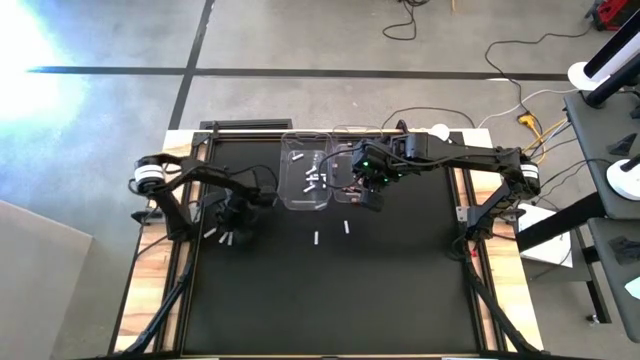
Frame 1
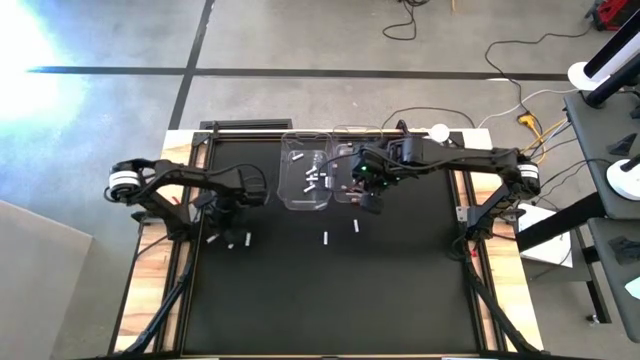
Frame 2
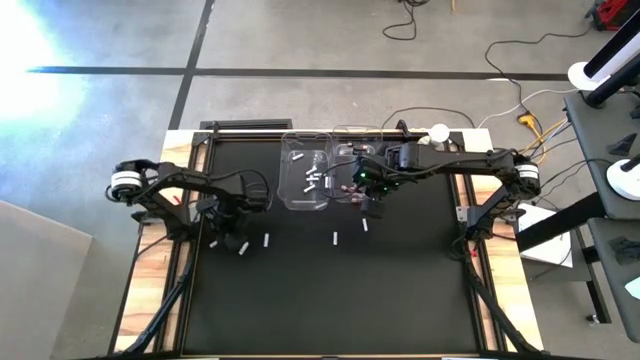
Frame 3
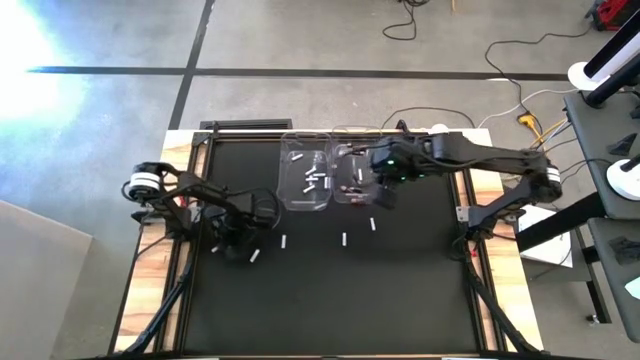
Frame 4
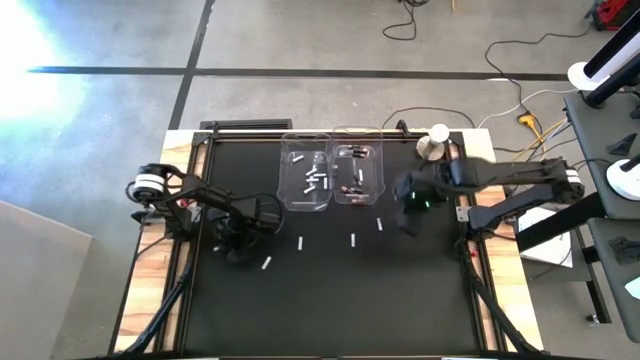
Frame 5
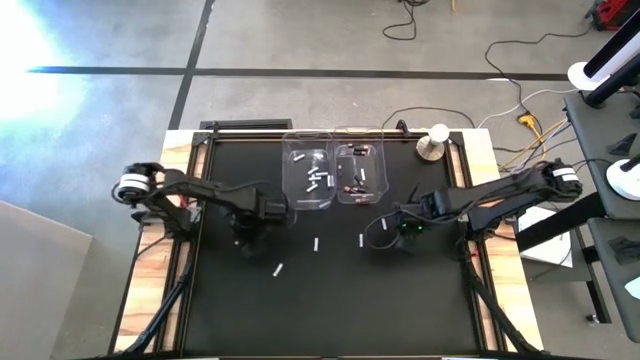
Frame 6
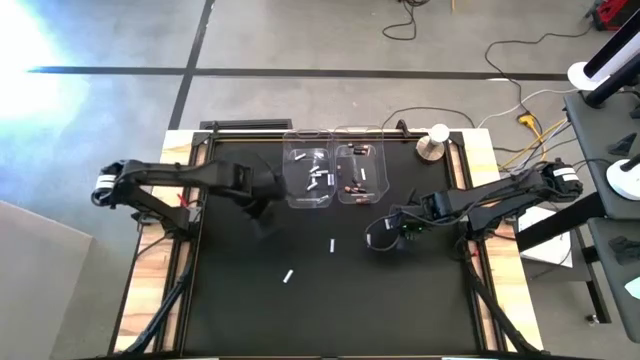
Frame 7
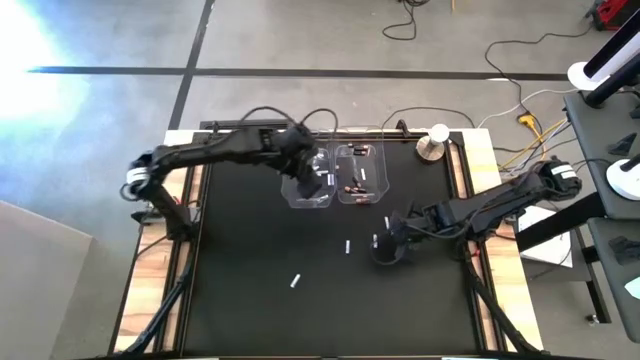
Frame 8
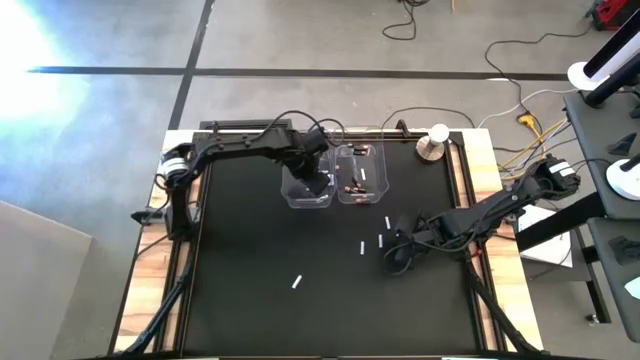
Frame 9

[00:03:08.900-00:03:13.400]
Task: Sort batteries
Put the white battery into the left transparent bin

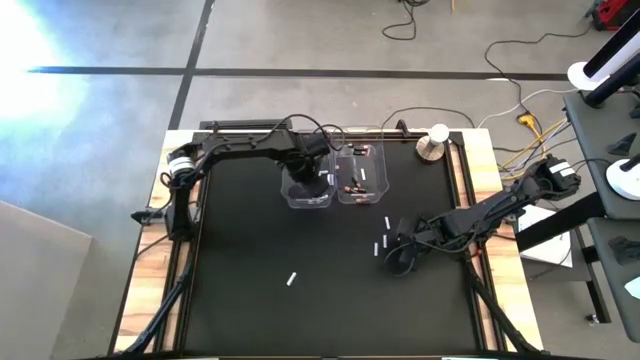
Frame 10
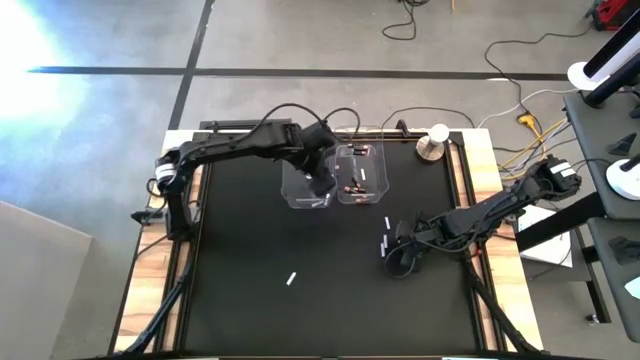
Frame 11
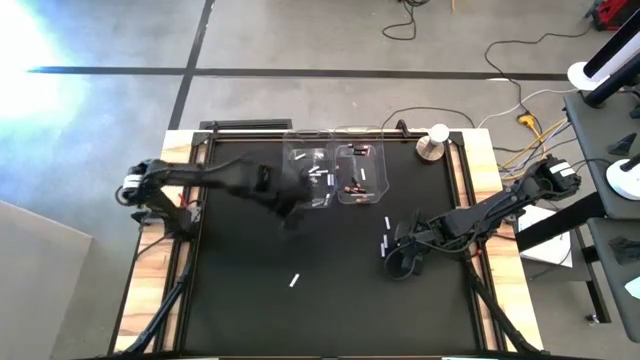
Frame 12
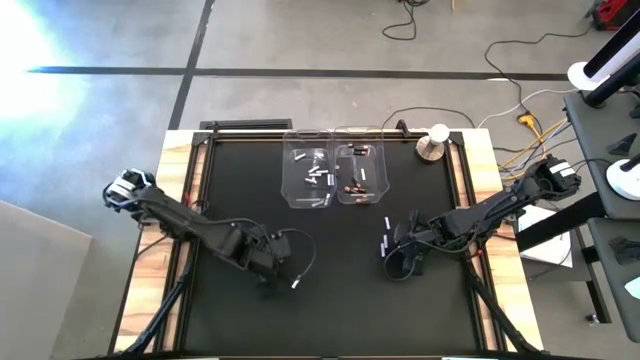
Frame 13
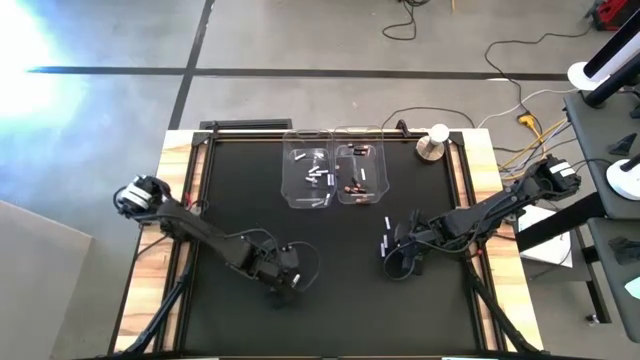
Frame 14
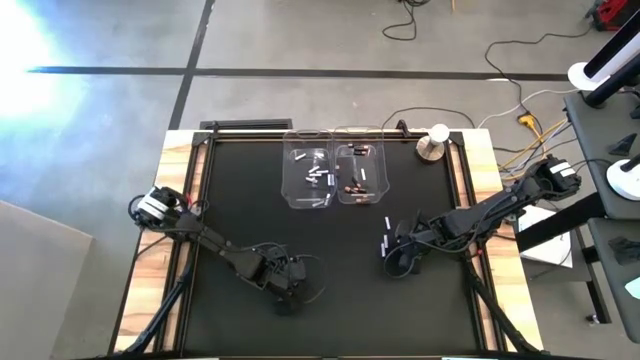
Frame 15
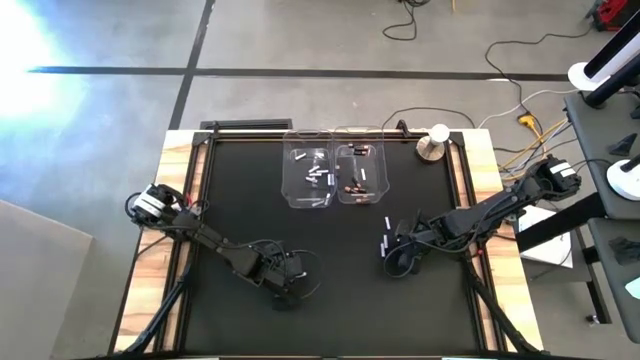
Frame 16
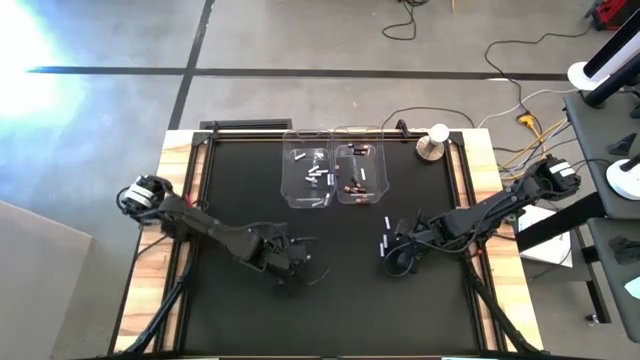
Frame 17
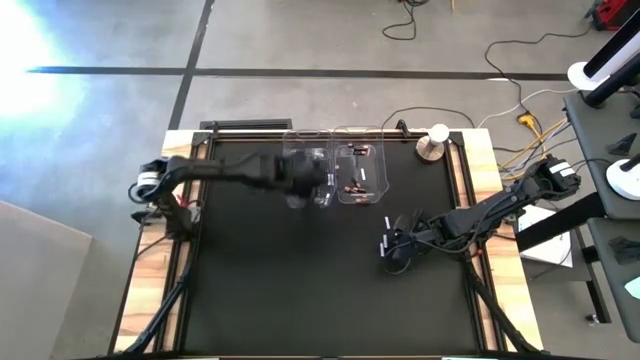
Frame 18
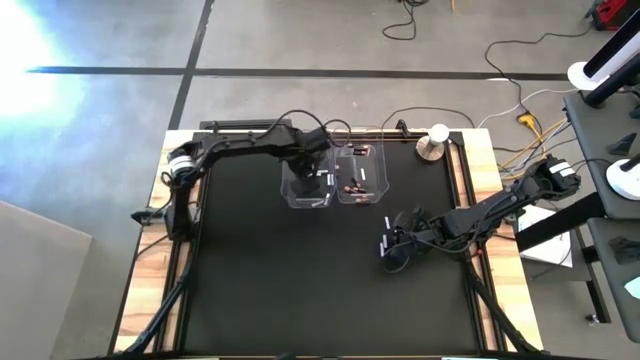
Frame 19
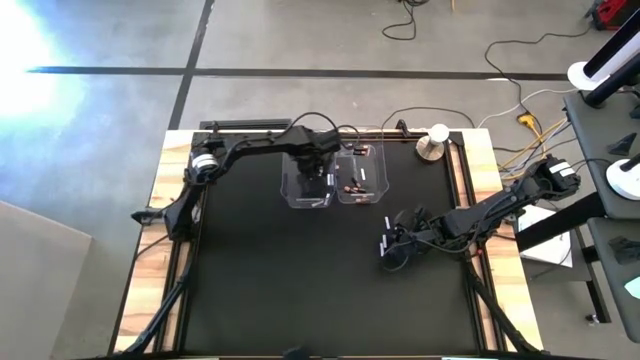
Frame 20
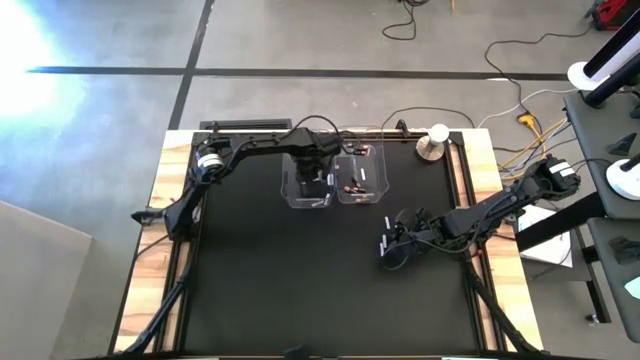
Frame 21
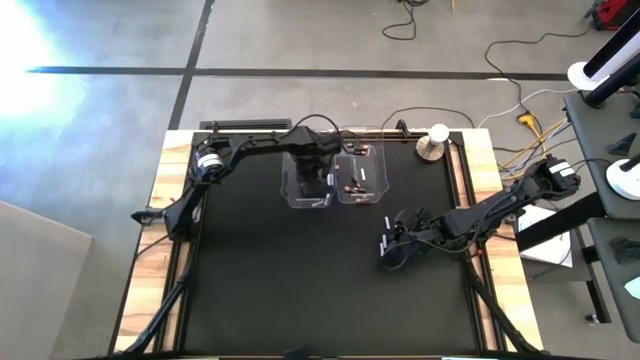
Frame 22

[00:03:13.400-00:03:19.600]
Put the white battery into the left transparent bin

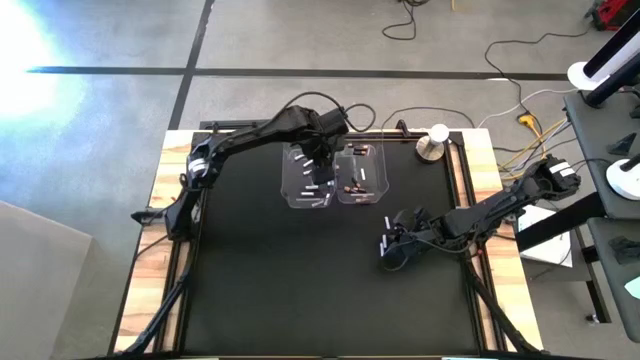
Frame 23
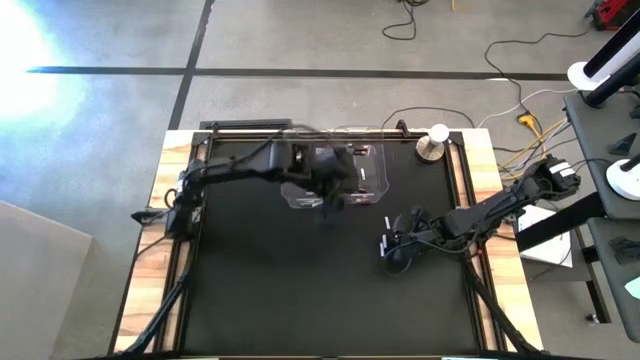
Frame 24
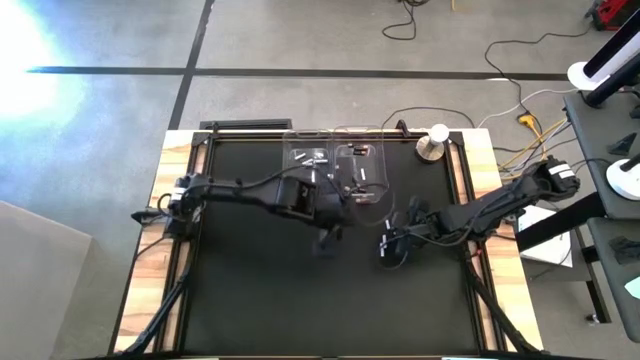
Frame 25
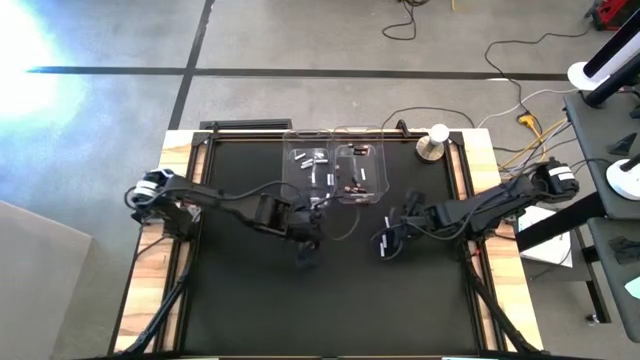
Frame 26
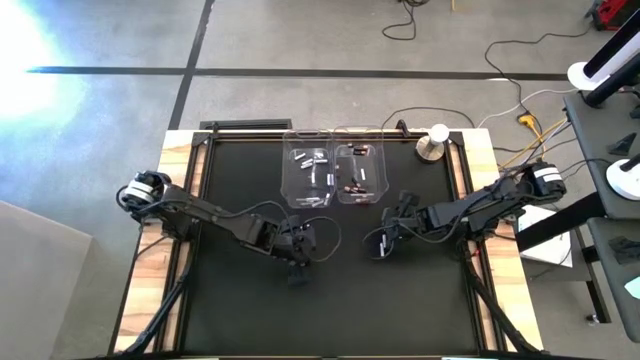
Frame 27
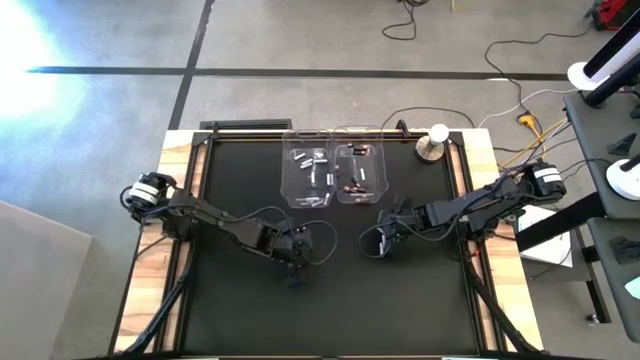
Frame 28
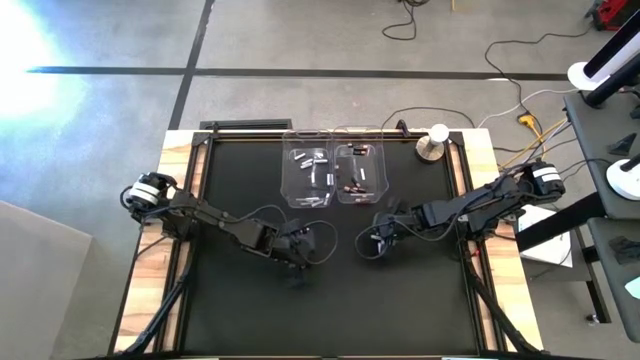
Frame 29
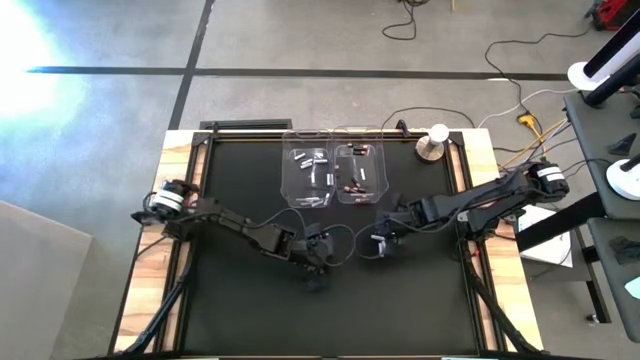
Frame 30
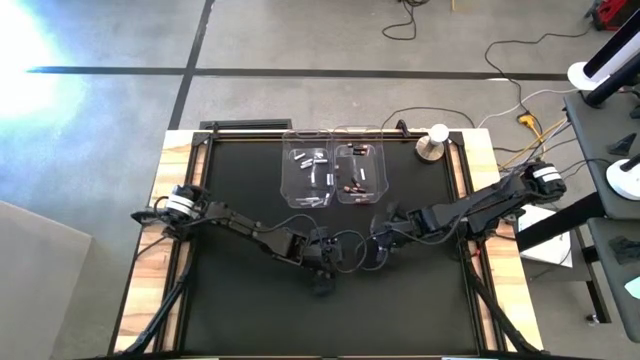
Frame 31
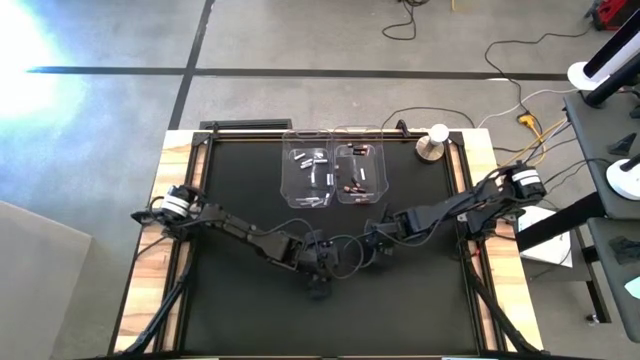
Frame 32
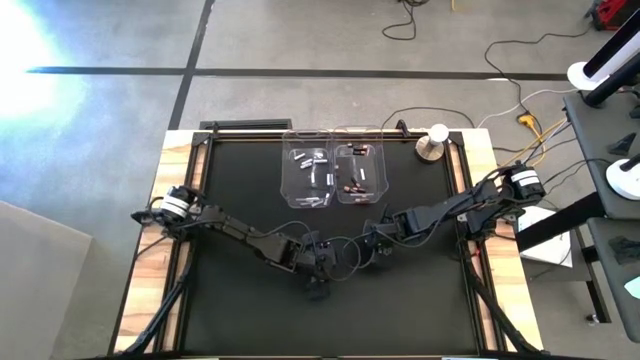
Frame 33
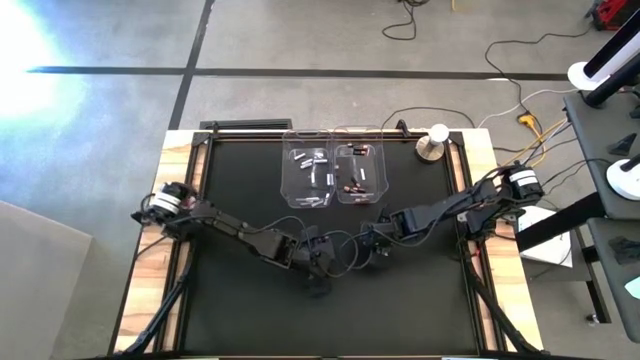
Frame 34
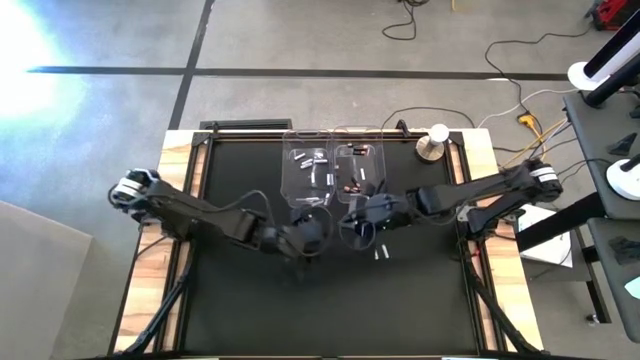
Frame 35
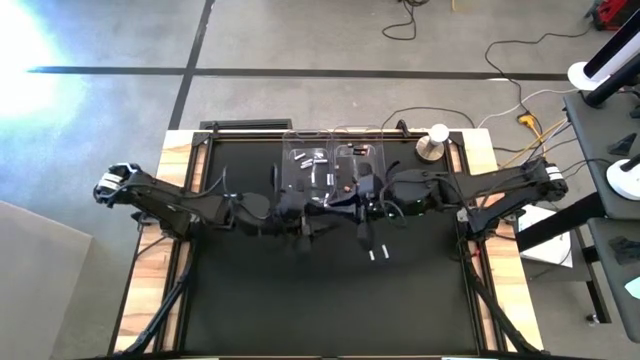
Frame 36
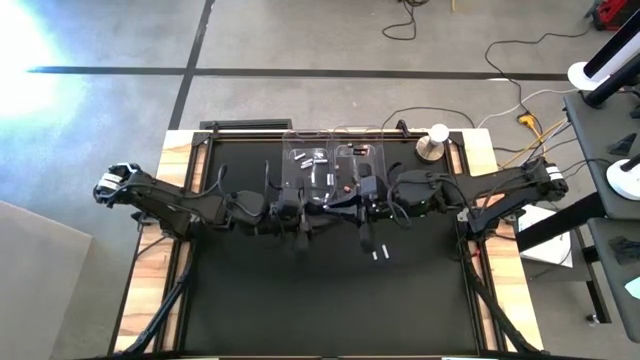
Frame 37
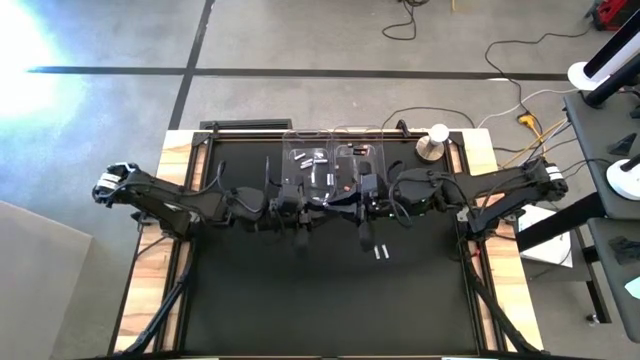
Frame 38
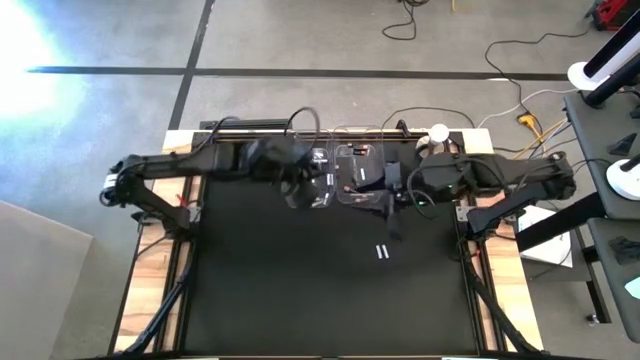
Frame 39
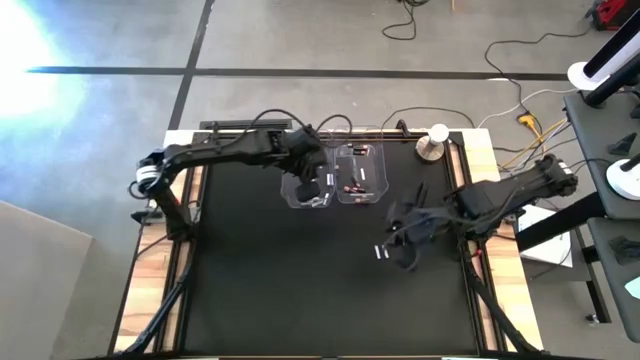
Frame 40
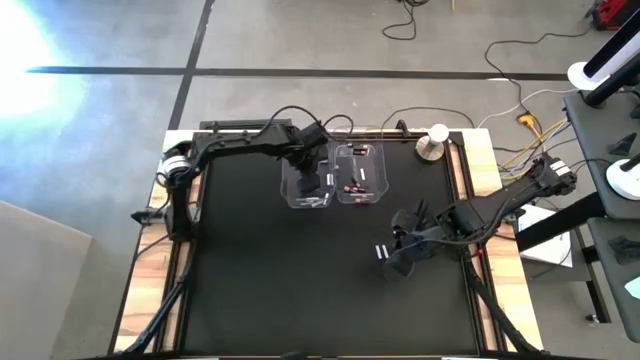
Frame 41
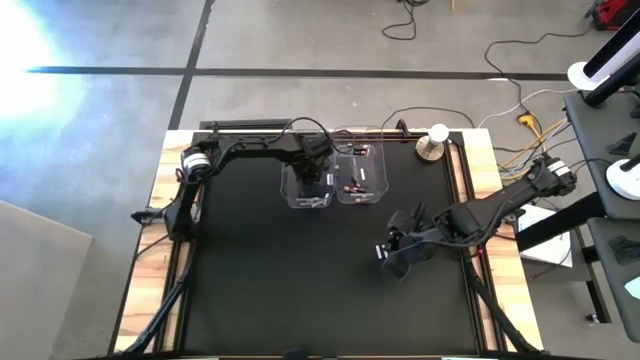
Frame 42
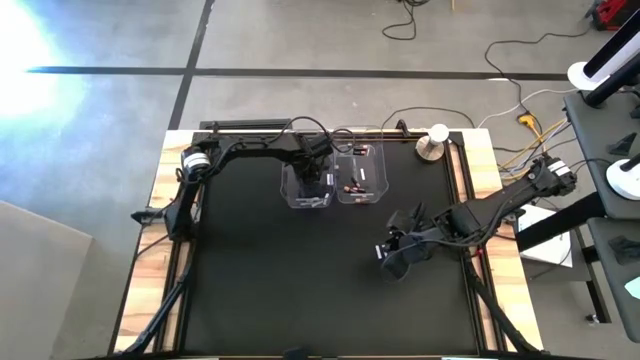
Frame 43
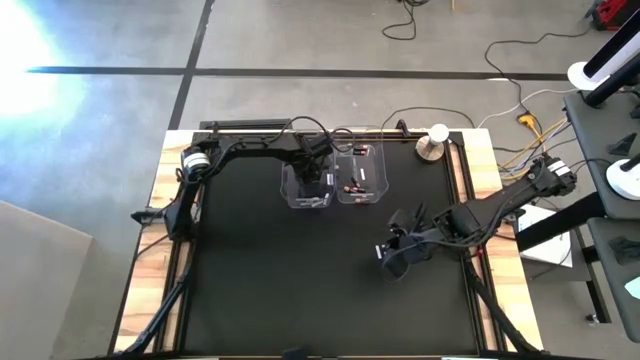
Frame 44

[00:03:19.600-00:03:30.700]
Put the white battery into the left transparent bin
